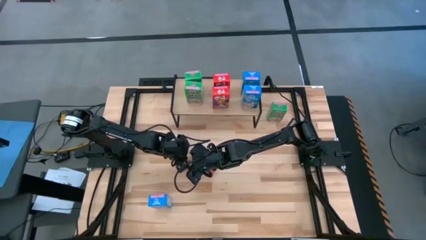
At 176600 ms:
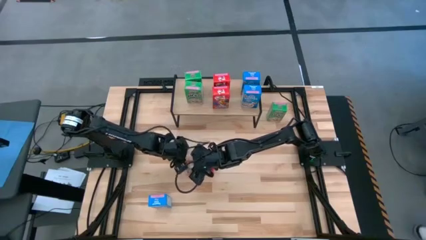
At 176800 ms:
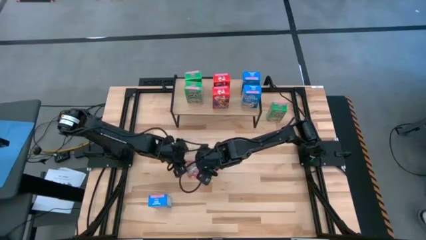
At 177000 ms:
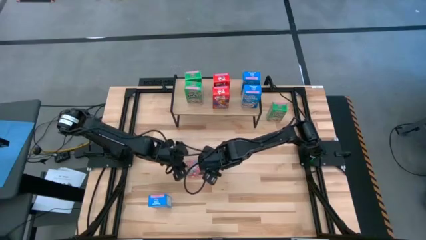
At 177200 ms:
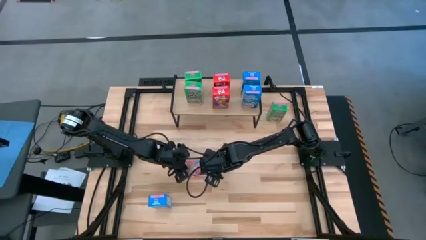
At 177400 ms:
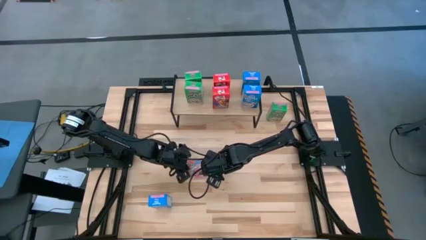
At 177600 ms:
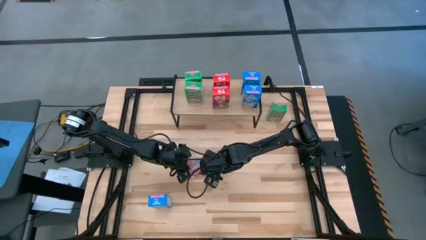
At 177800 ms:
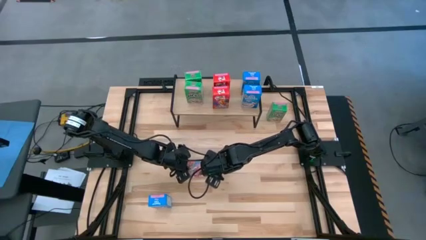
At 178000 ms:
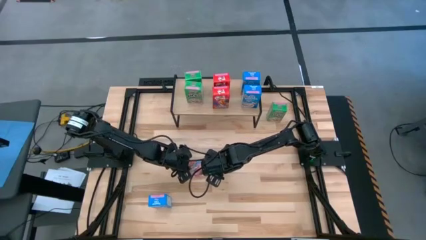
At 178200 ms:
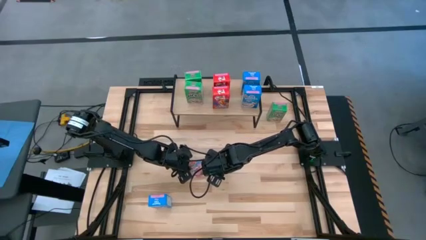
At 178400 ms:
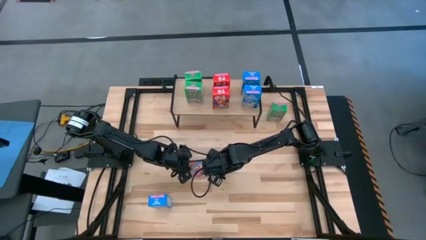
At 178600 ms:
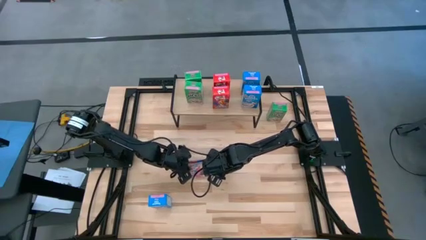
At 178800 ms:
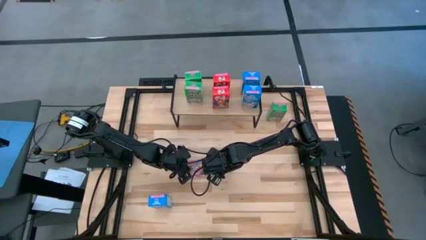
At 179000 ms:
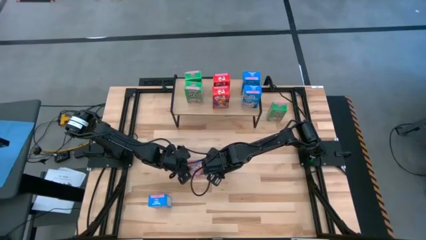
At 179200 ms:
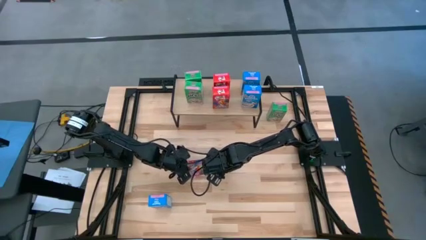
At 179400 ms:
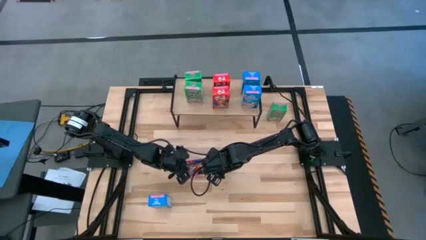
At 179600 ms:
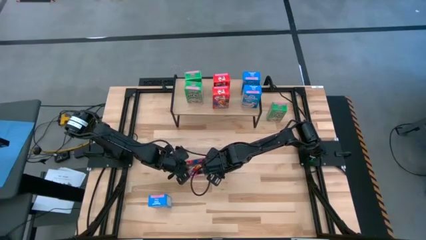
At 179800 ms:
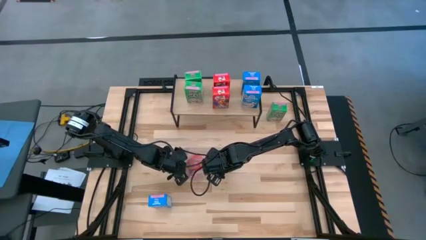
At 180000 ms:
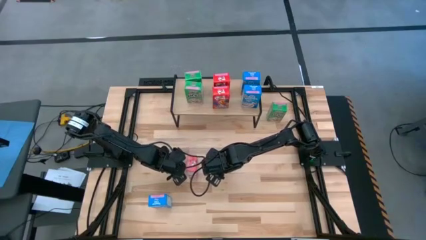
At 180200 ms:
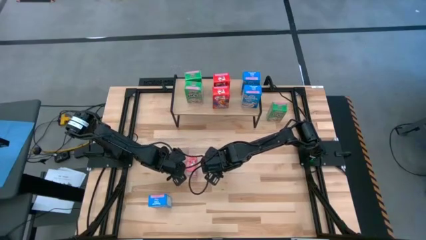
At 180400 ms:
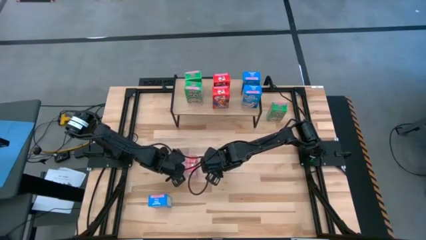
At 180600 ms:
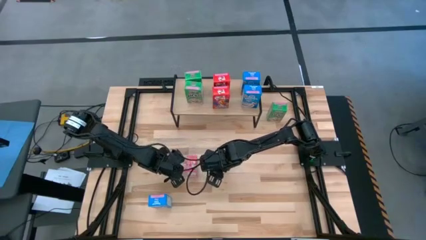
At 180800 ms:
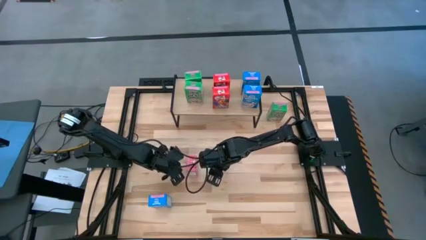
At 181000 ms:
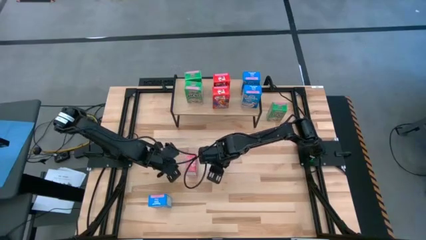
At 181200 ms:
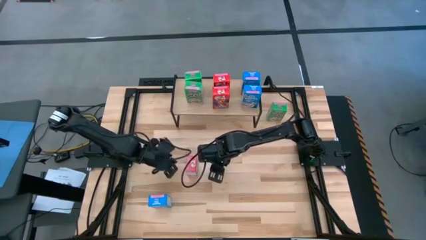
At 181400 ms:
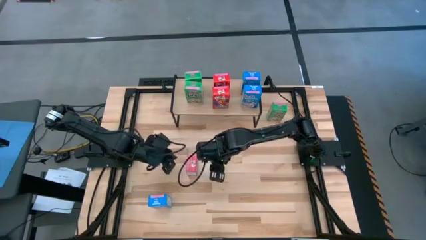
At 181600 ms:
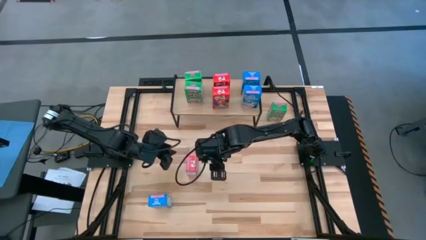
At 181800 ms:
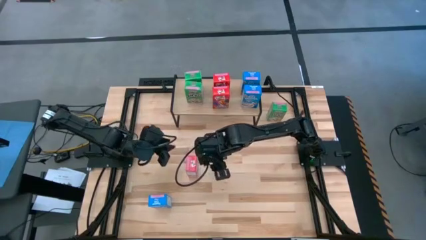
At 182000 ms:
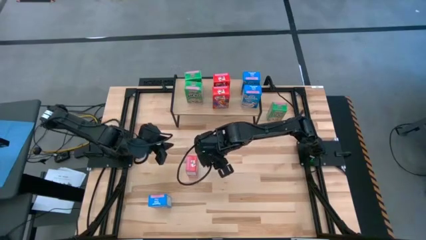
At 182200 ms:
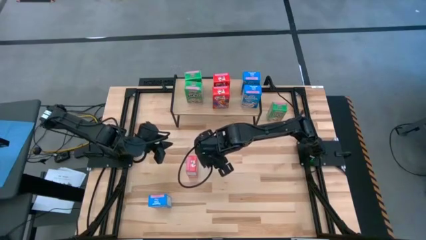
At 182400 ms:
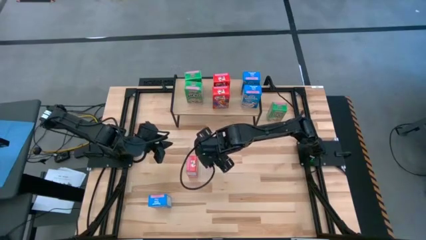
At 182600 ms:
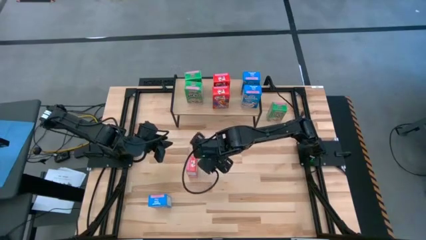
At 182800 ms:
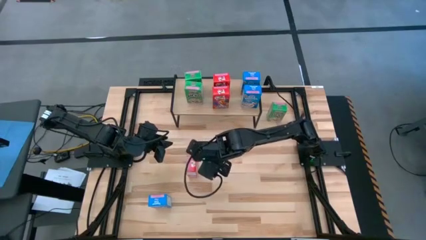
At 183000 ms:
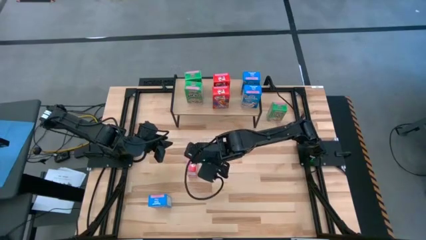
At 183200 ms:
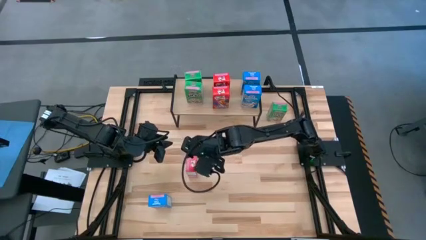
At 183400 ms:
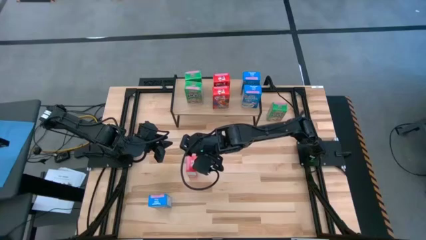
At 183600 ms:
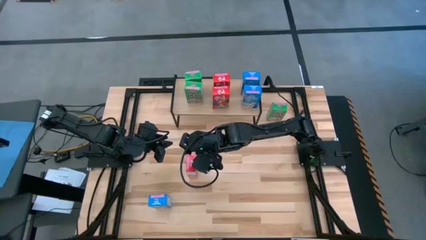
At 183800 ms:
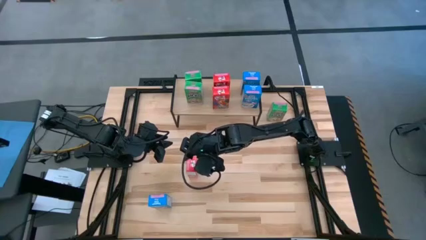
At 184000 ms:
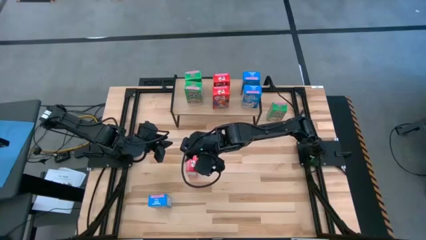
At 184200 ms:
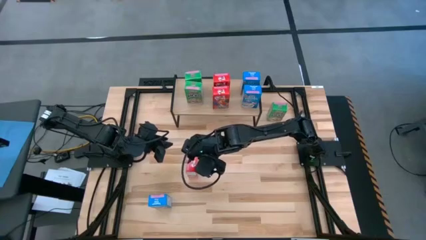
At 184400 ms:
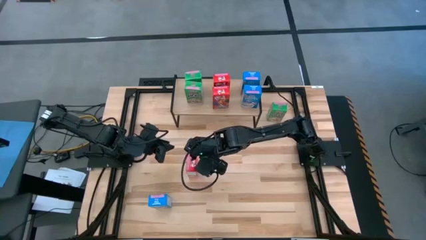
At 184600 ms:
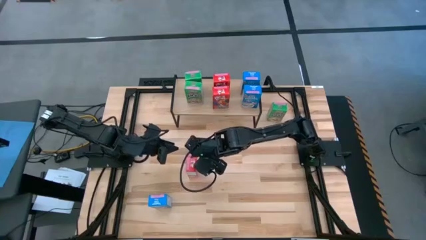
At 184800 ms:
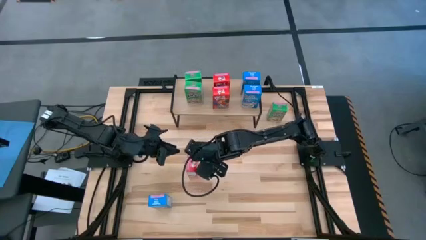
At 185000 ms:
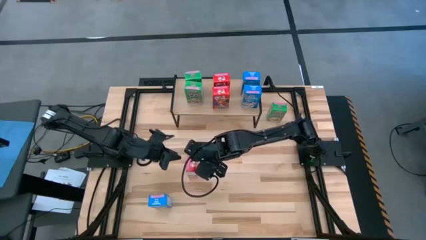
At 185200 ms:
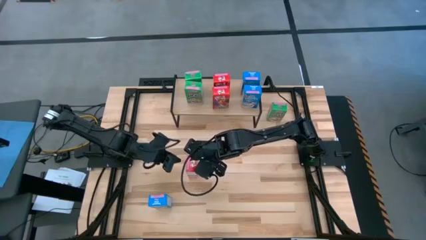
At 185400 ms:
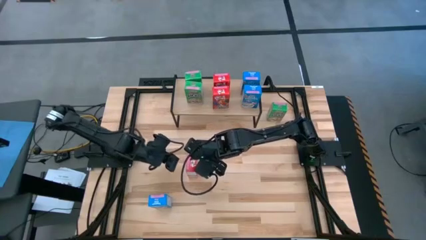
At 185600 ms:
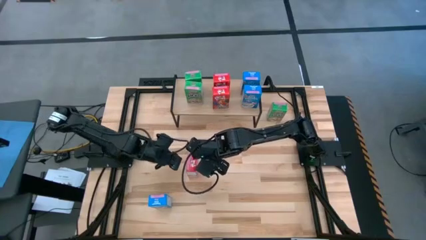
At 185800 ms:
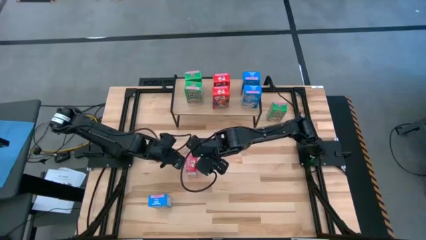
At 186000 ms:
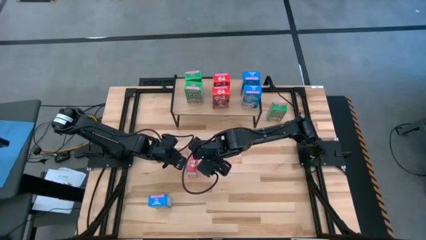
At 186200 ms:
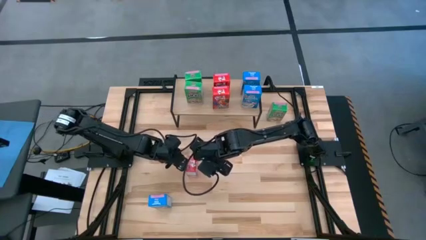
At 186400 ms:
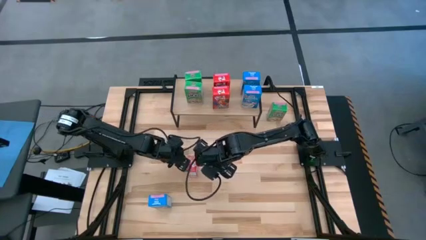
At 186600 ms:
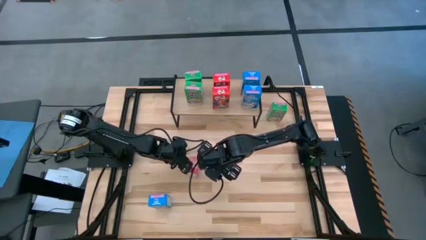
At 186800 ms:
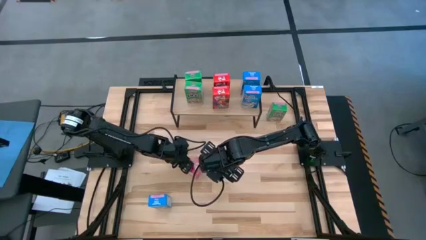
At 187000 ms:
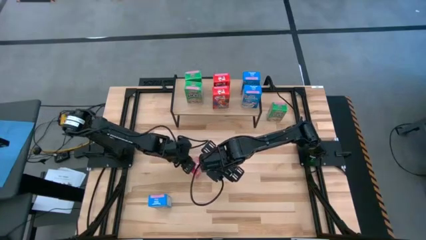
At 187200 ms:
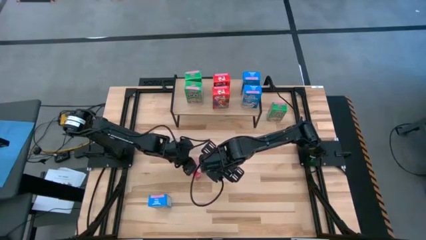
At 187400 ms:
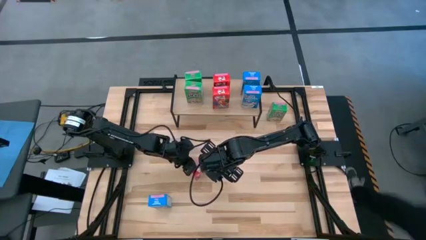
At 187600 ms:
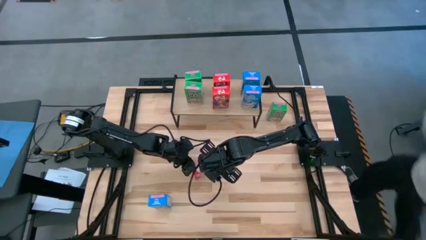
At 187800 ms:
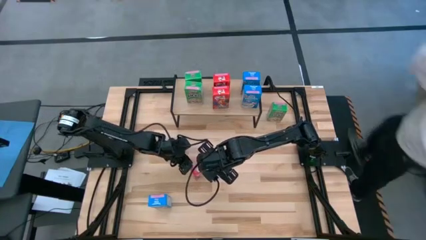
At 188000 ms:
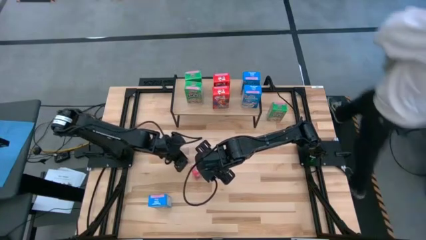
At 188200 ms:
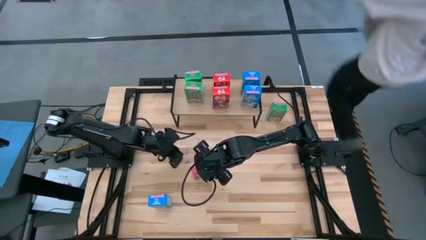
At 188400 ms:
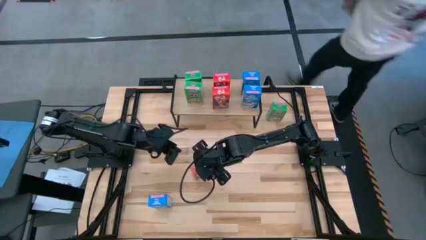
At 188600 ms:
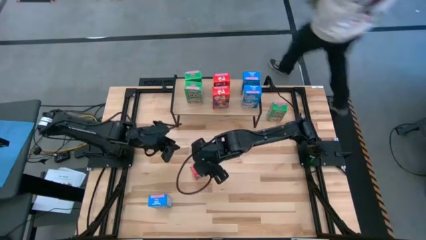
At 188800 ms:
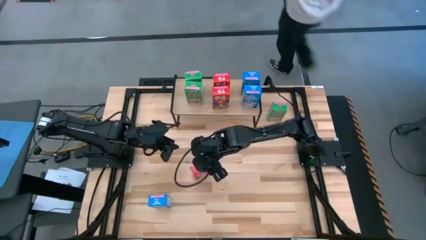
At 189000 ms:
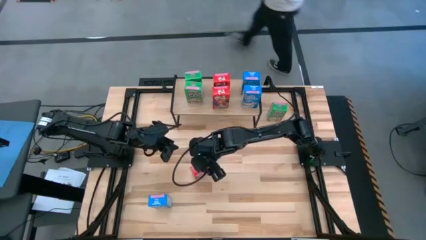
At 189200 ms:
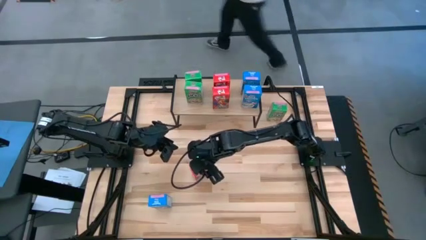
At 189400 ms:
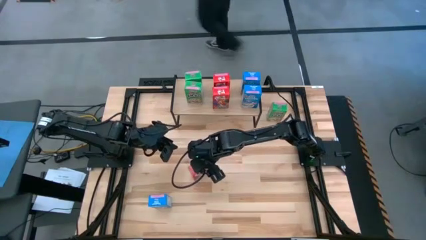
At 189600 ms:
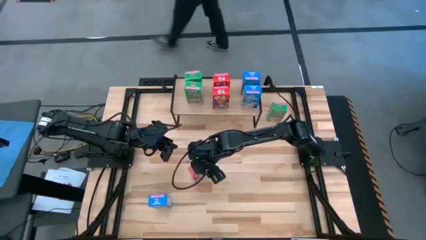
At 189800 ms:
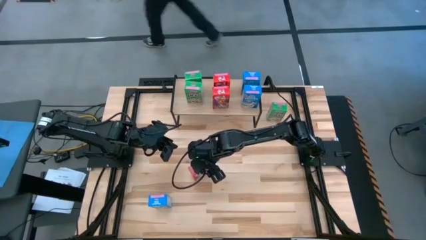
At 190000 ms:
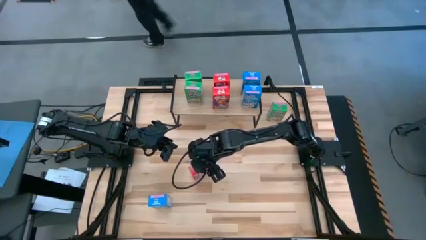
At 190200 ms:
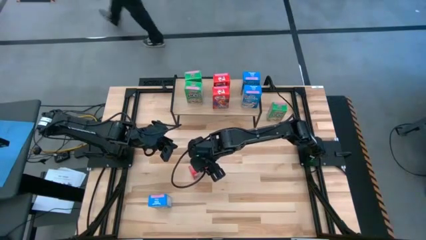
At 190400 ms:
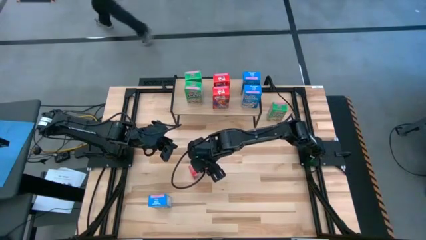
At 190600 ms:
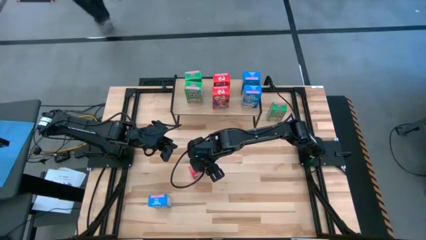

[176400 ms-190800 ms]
Task: Stack cereal on shelf
Put the red cereal box on the shelf aligned with the other red cereal boxes
